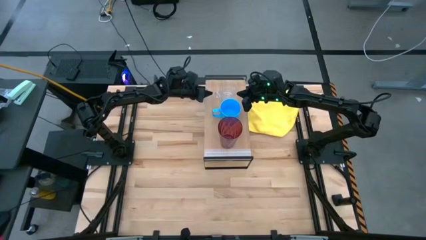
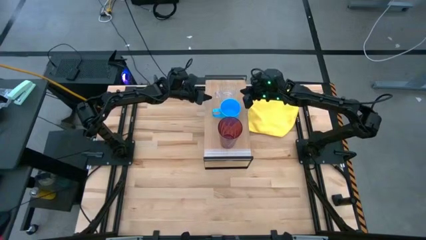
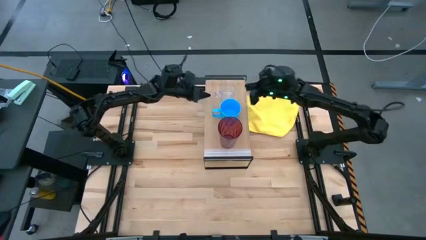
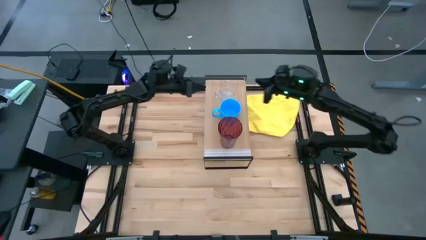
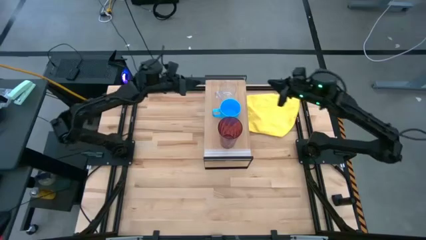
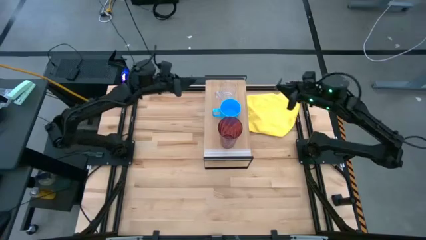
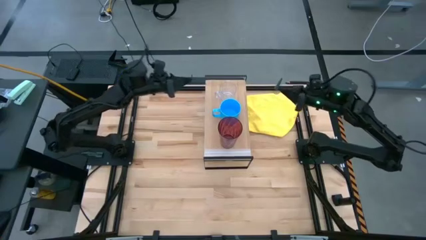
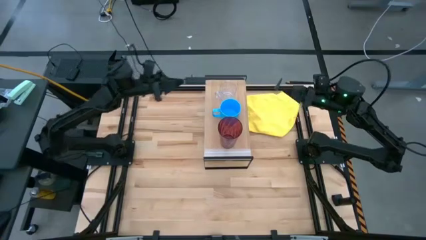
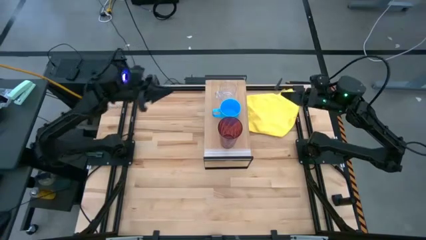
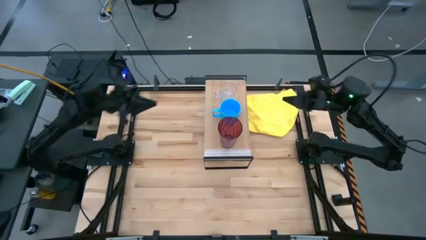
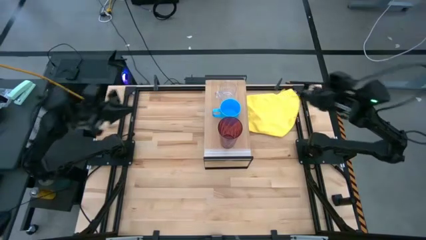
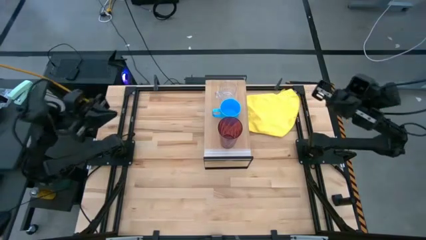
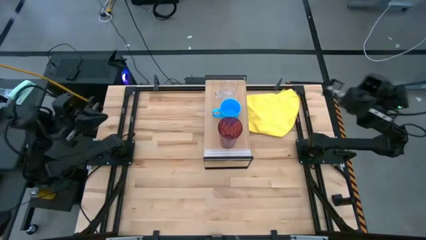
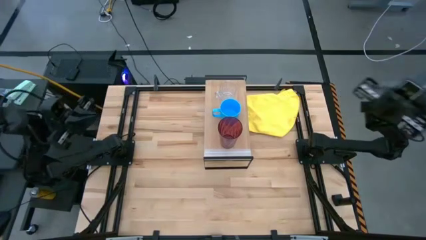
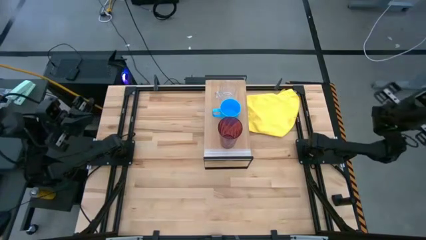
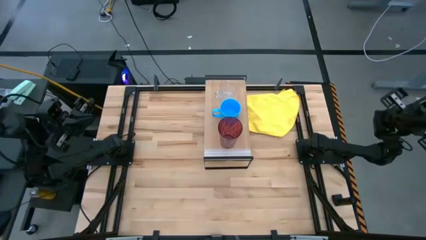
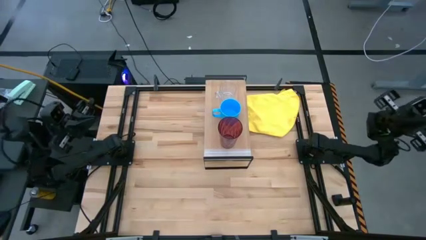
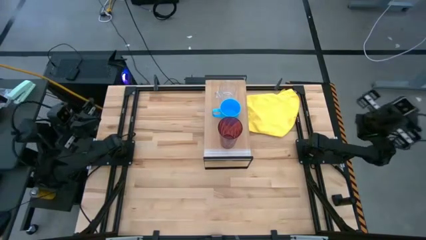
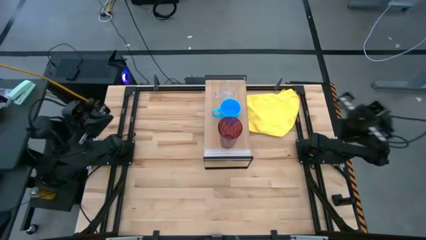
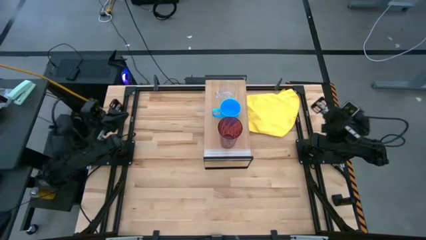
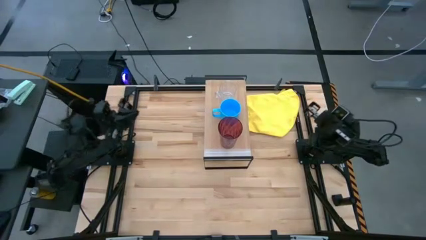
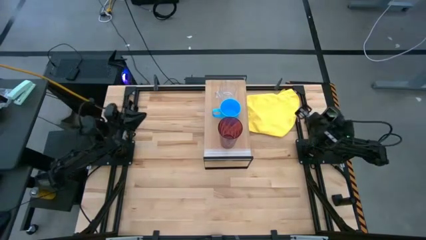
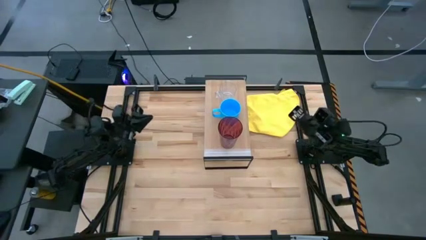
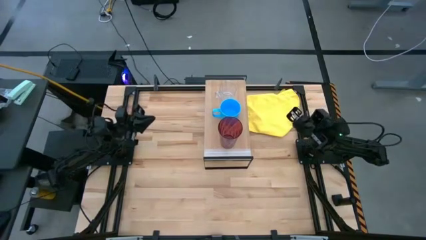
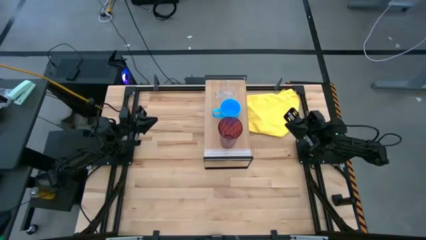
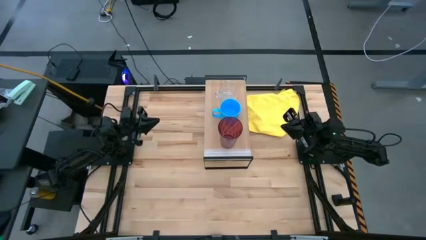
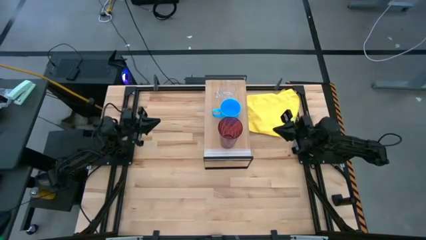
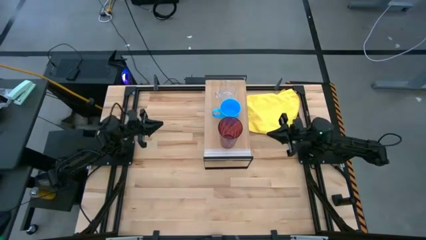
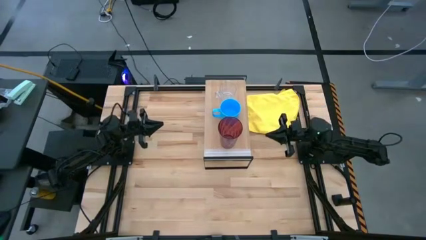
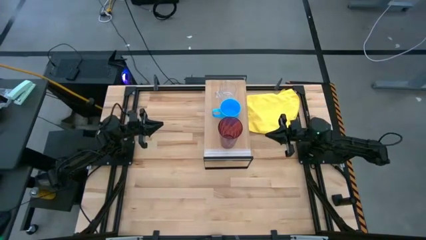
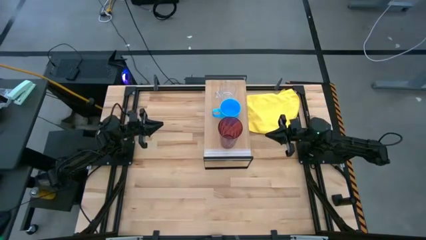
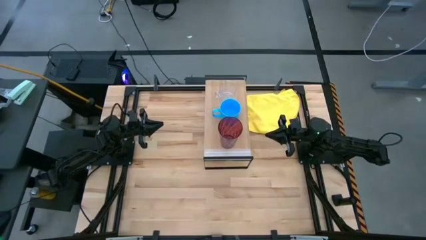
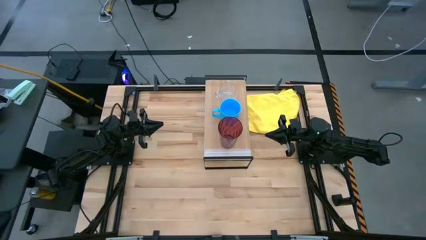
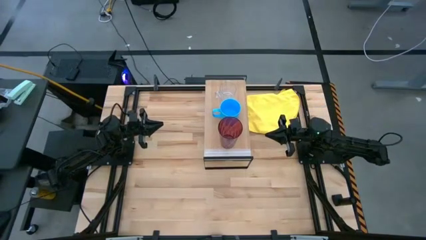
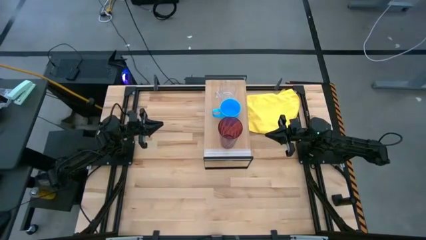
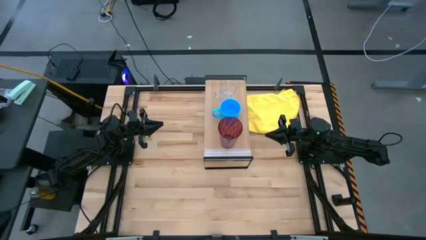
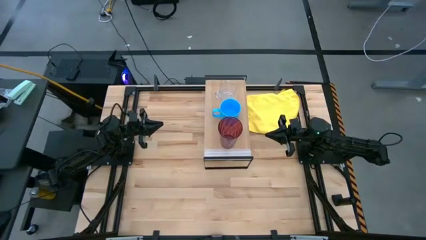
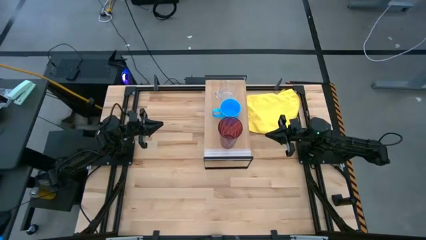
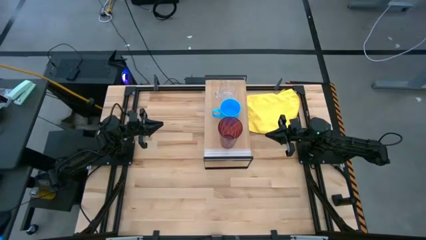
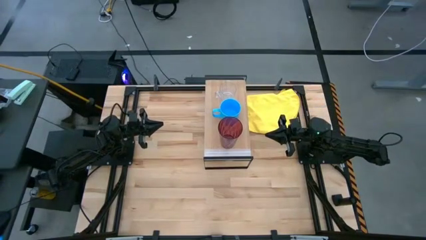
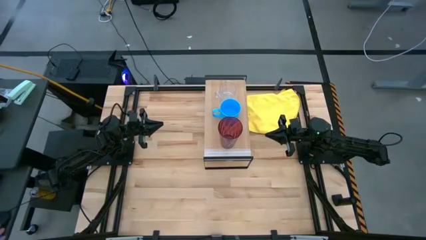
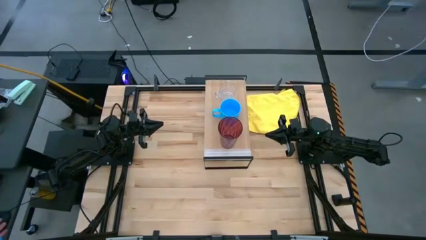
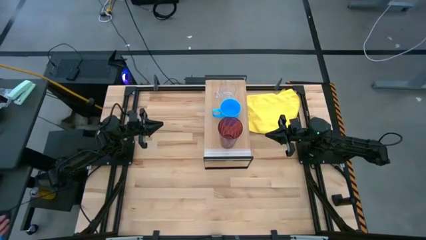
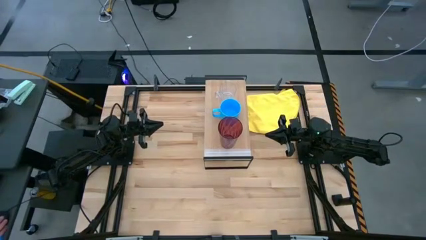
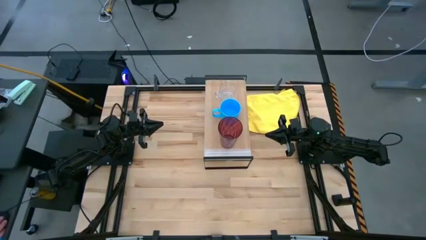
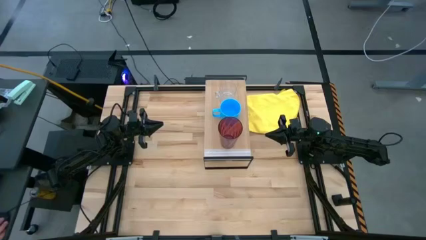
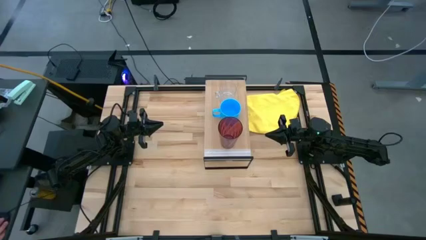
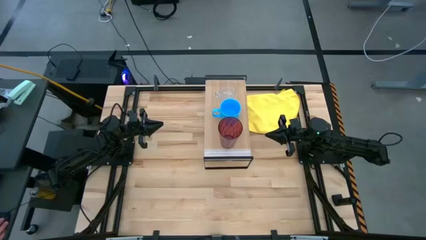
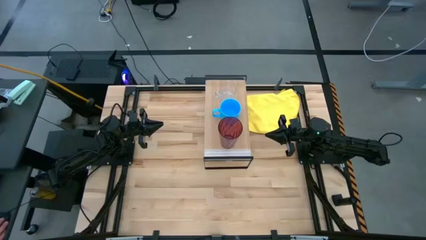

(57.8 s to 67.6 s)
Task: Stack small to large cups/mugs on shelf
Return to Home Position

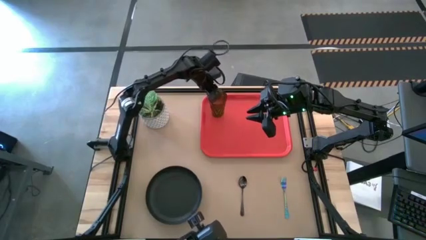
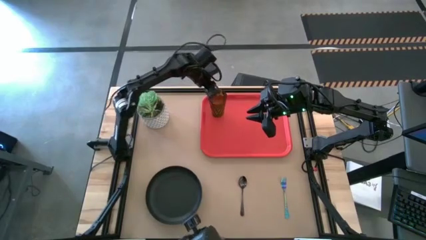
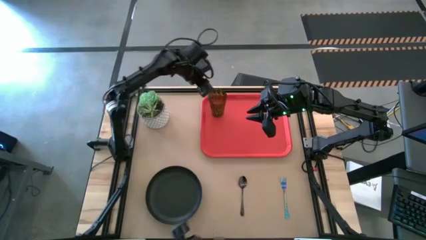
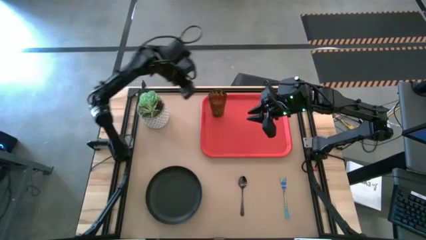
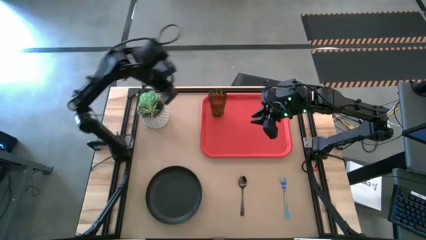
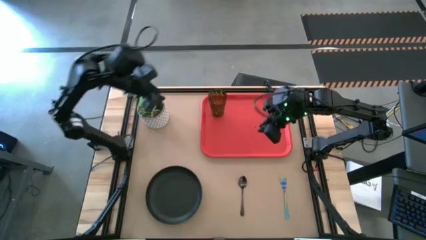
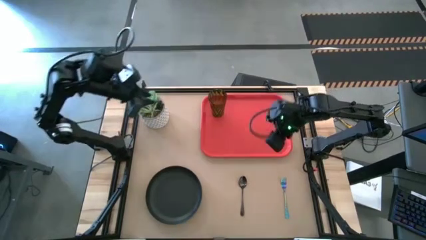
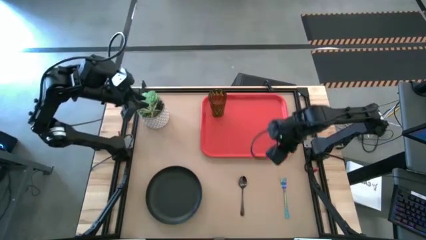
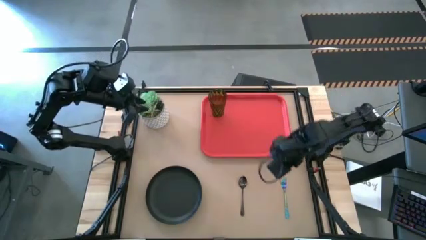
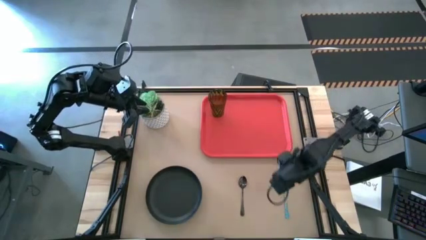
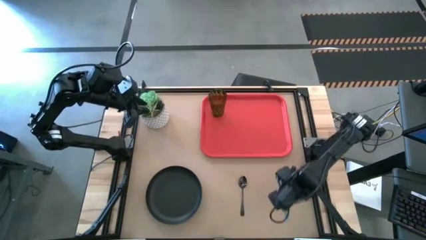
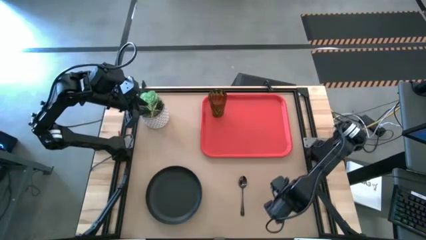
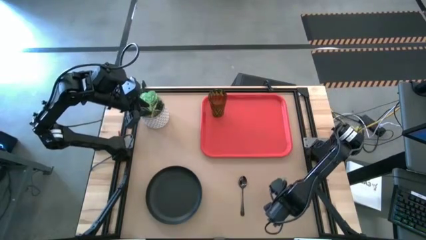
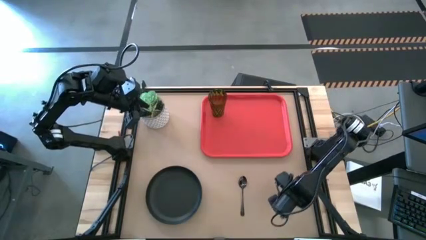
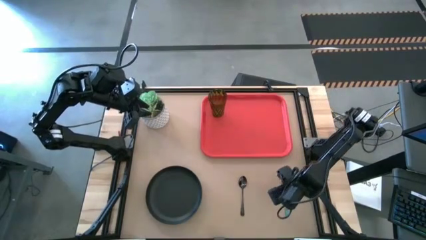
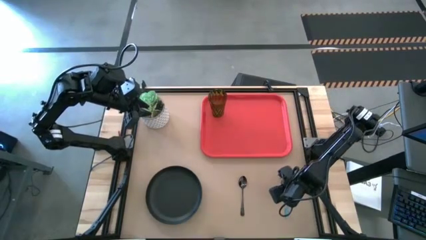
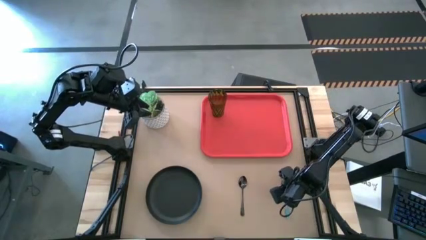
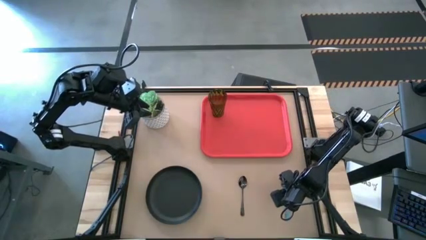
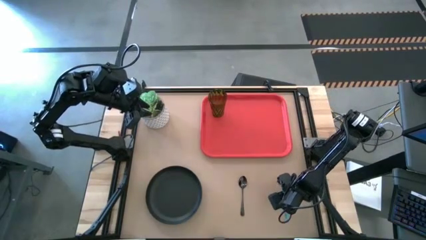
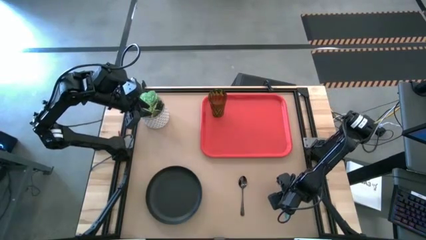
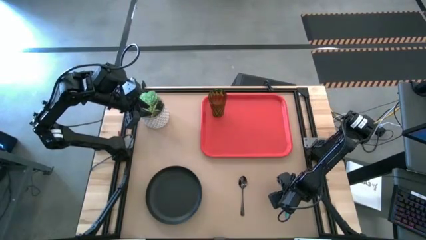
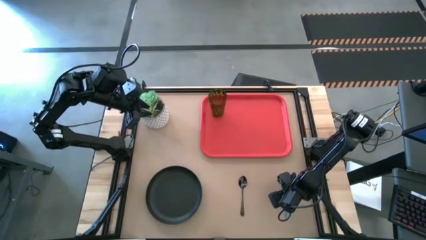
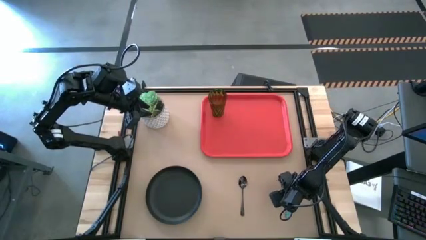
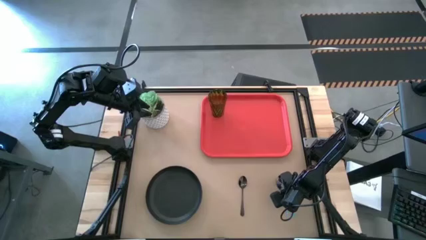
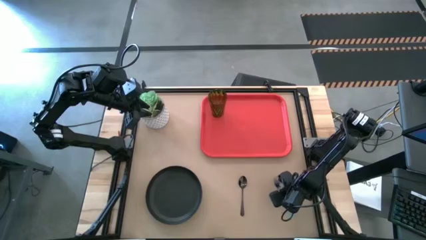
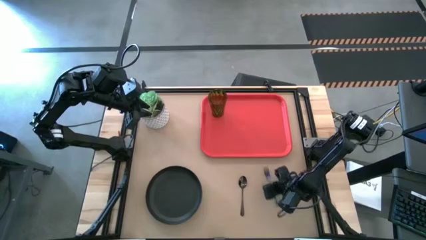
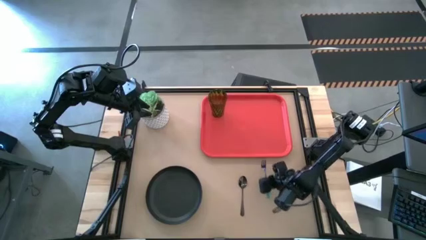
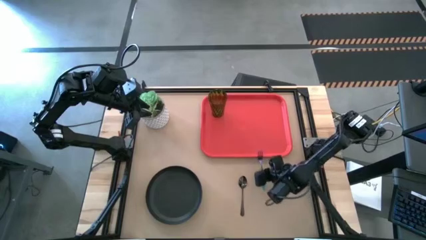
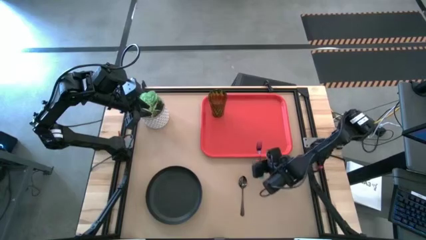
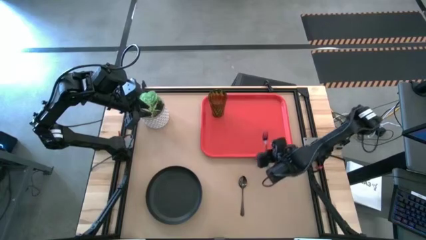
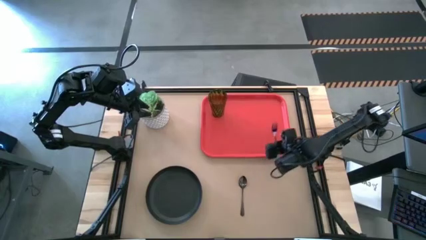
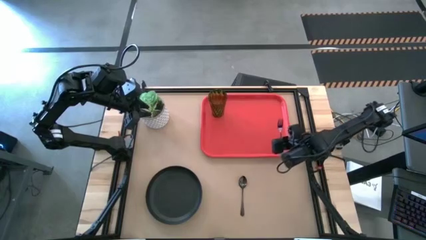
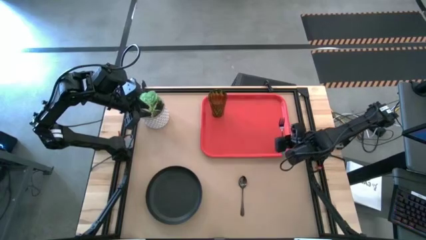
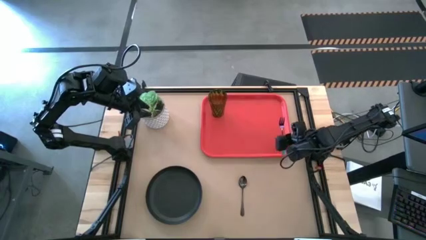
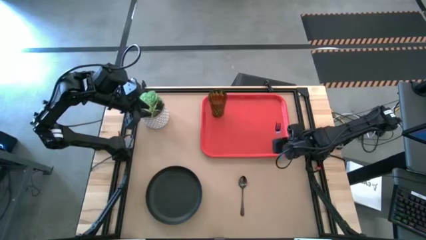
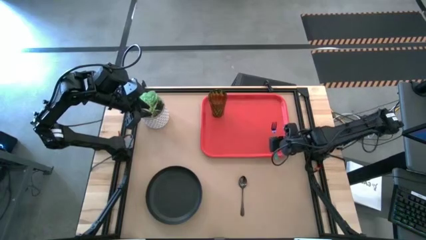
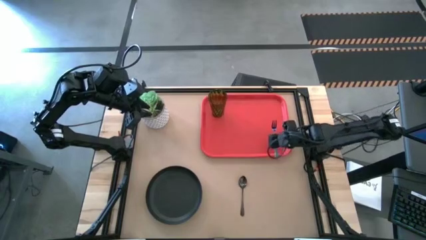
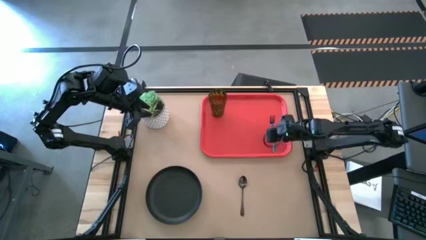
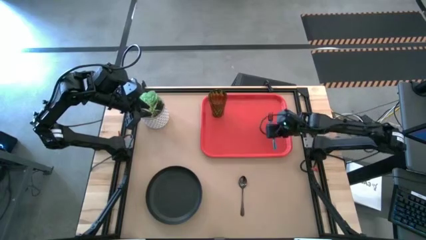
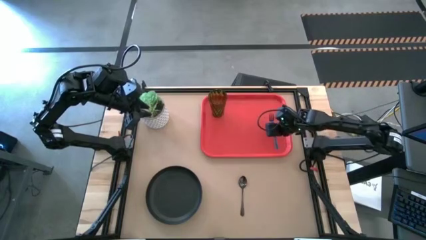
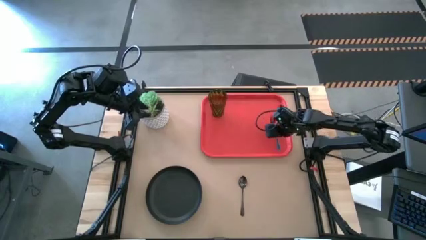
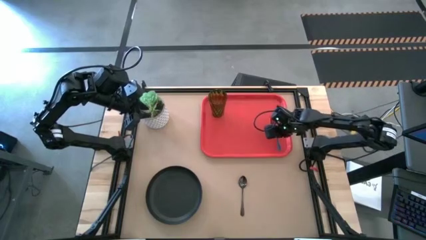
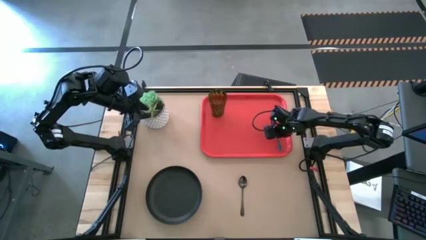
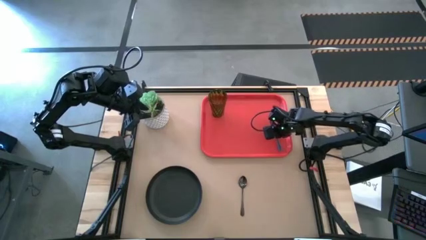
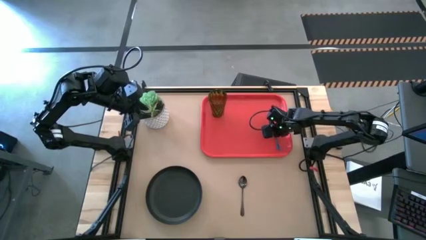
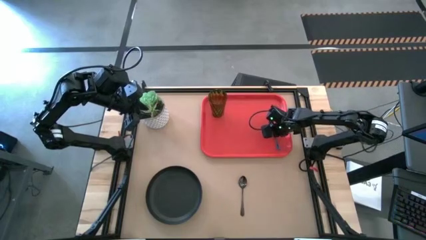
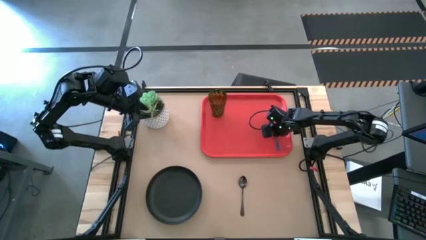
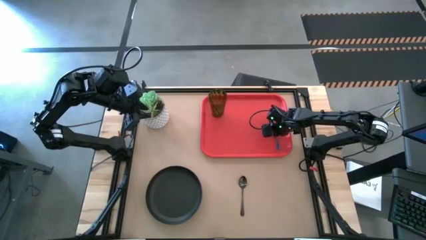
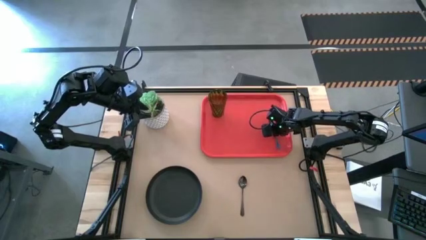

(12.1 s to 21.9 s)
Task: Pick and place plate/cup/fork/spoon on tray
Put the blue fork on the right of the red tray
